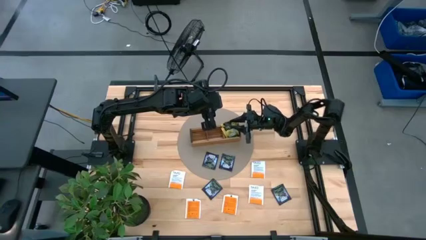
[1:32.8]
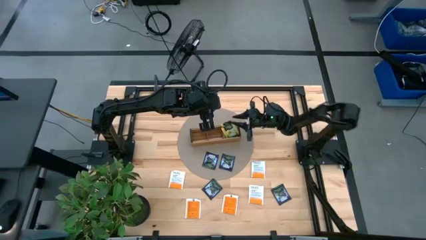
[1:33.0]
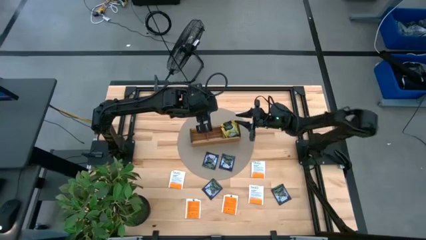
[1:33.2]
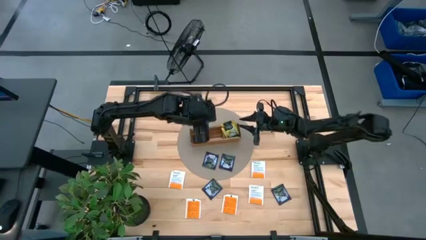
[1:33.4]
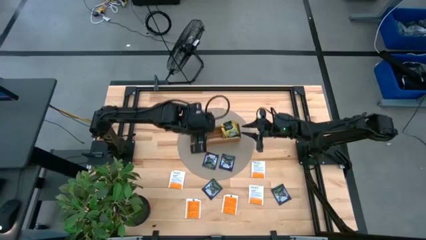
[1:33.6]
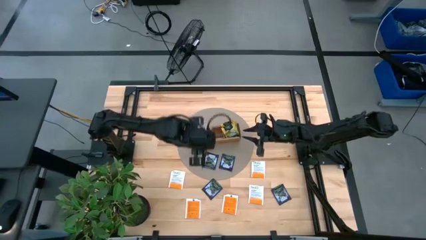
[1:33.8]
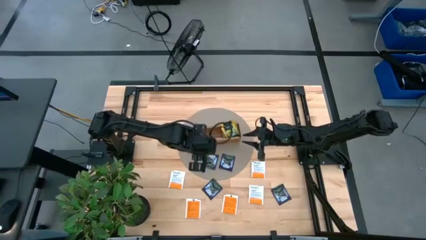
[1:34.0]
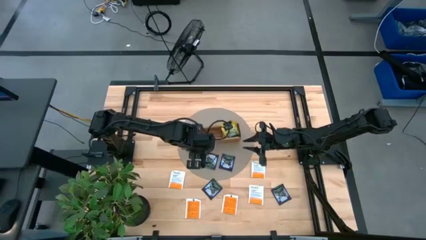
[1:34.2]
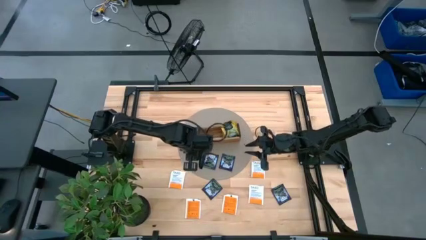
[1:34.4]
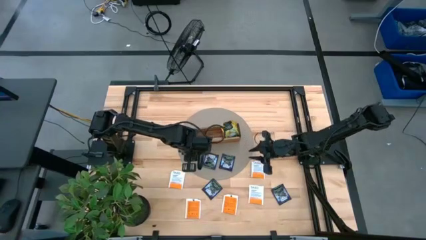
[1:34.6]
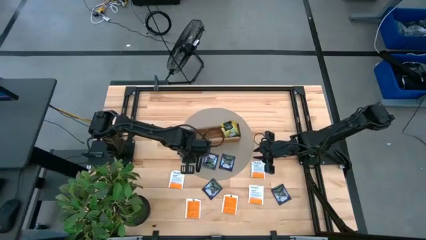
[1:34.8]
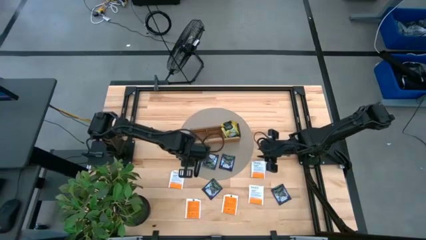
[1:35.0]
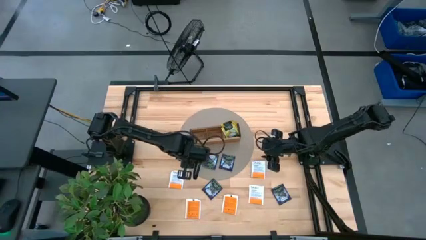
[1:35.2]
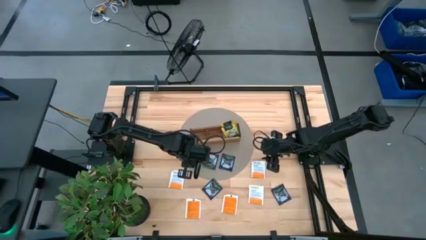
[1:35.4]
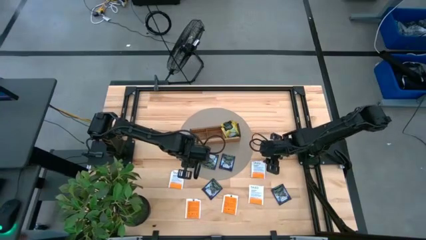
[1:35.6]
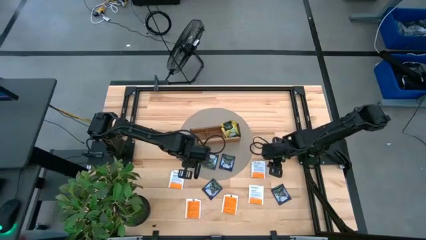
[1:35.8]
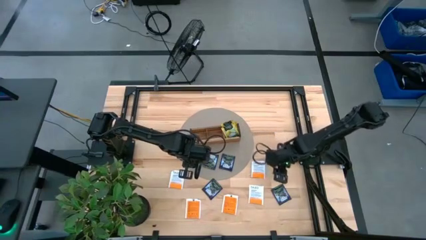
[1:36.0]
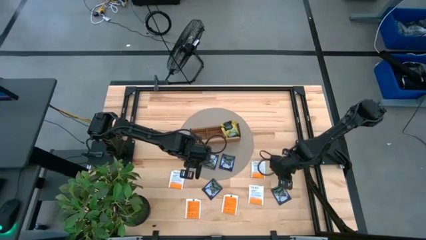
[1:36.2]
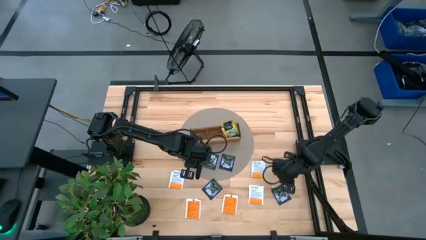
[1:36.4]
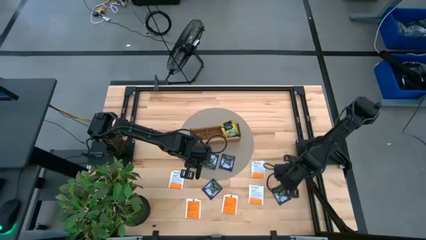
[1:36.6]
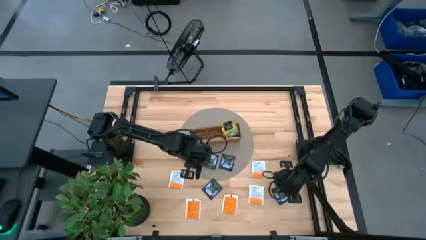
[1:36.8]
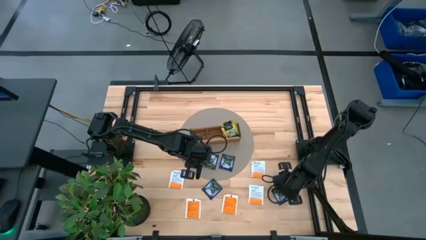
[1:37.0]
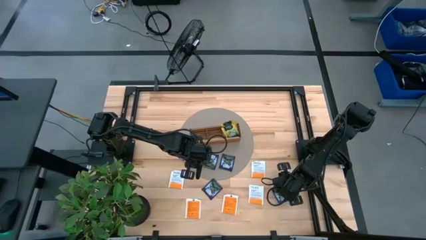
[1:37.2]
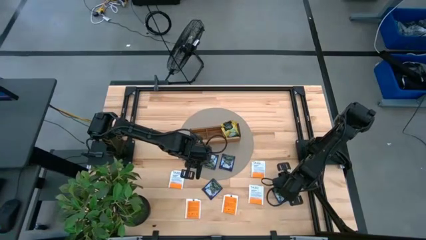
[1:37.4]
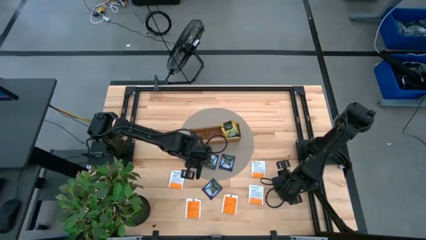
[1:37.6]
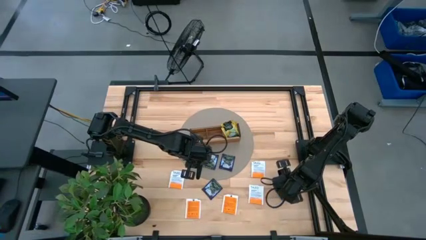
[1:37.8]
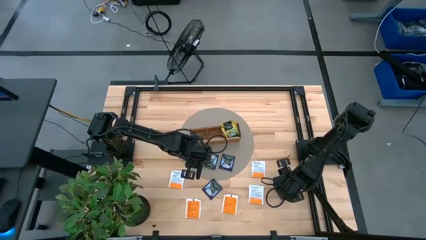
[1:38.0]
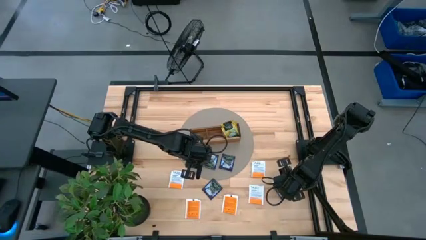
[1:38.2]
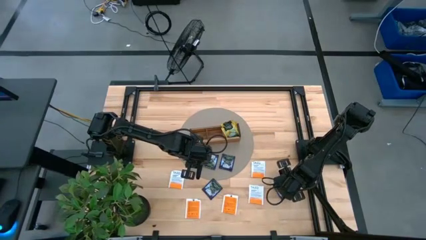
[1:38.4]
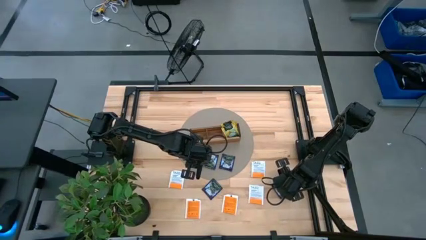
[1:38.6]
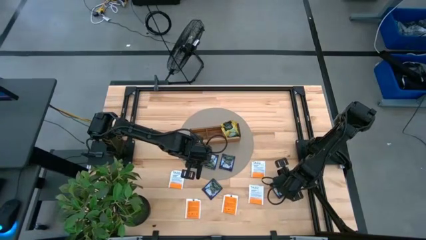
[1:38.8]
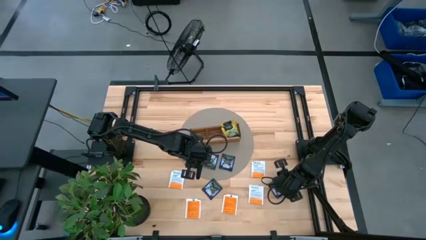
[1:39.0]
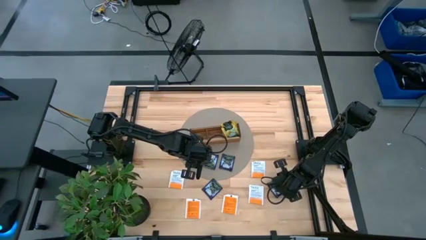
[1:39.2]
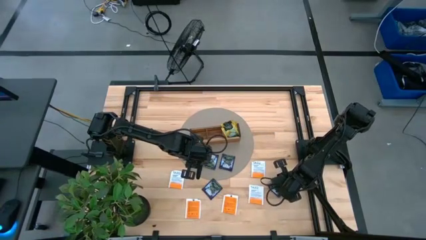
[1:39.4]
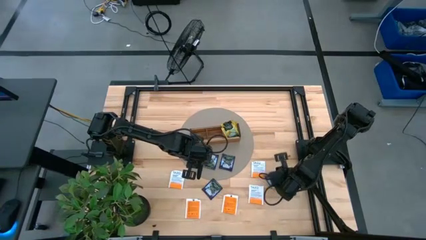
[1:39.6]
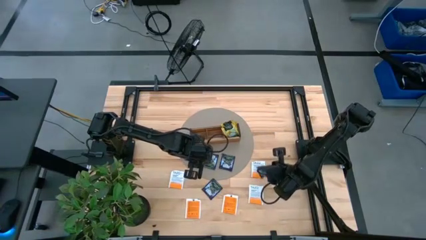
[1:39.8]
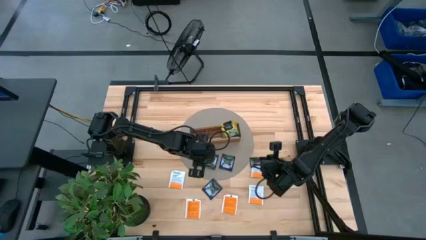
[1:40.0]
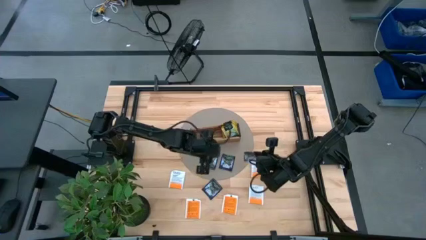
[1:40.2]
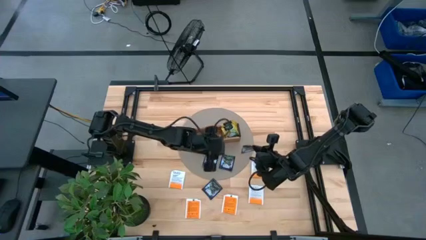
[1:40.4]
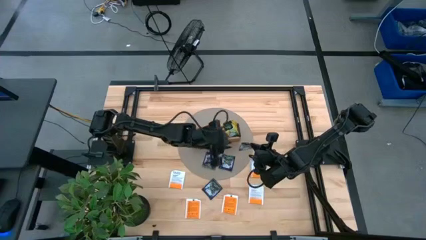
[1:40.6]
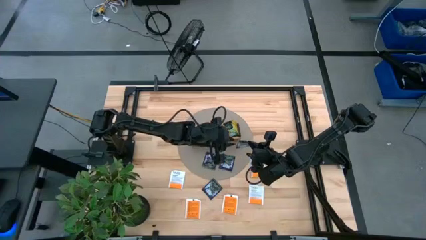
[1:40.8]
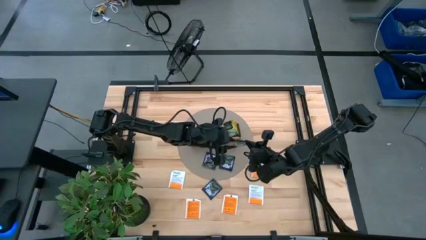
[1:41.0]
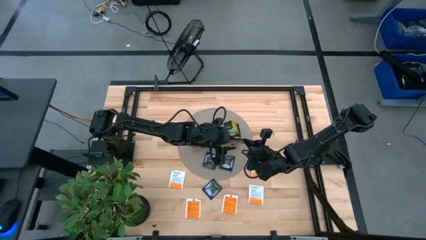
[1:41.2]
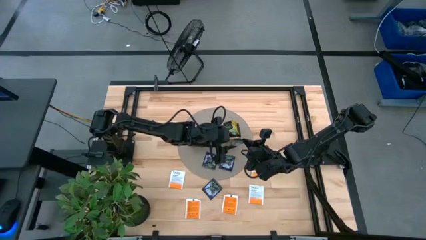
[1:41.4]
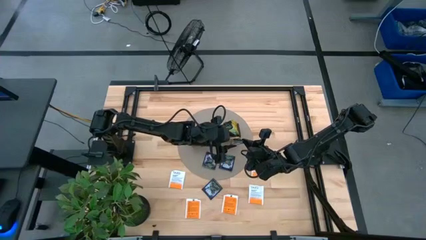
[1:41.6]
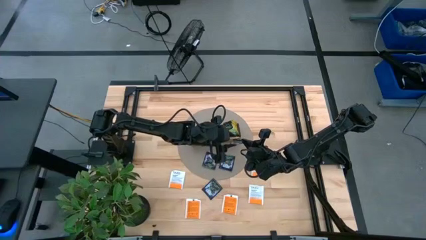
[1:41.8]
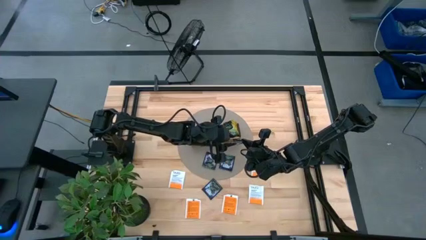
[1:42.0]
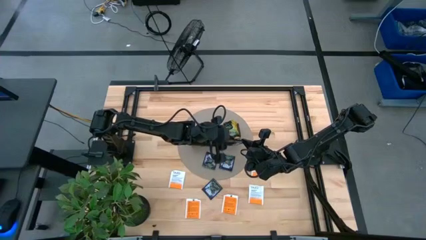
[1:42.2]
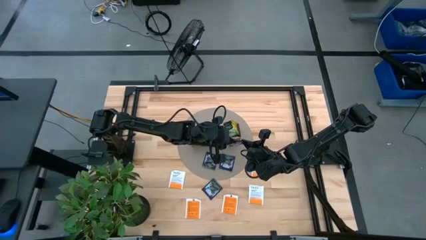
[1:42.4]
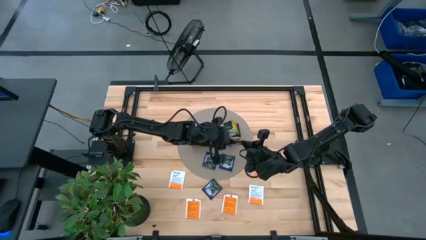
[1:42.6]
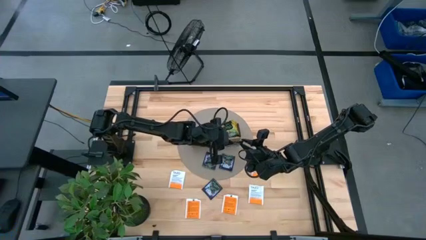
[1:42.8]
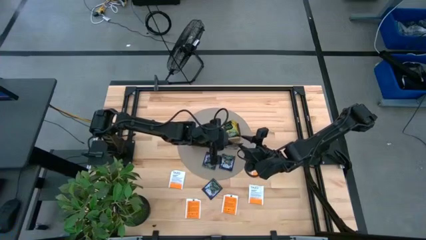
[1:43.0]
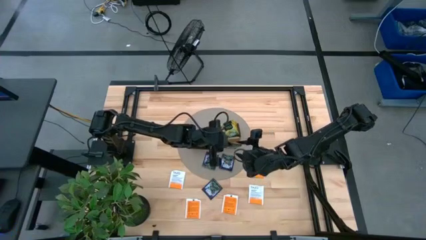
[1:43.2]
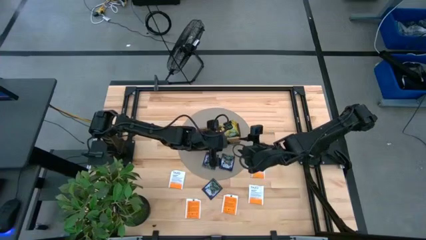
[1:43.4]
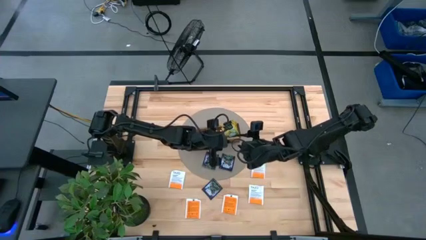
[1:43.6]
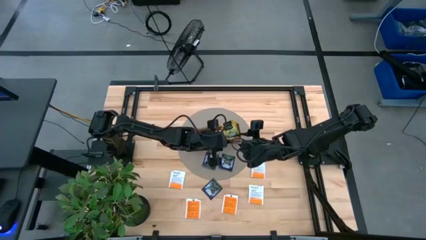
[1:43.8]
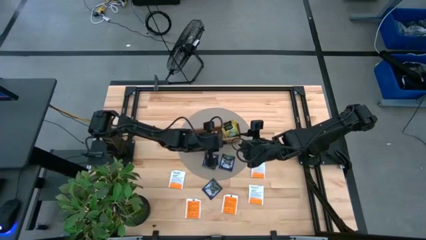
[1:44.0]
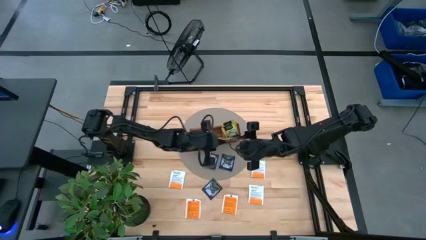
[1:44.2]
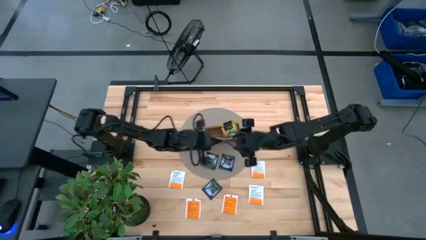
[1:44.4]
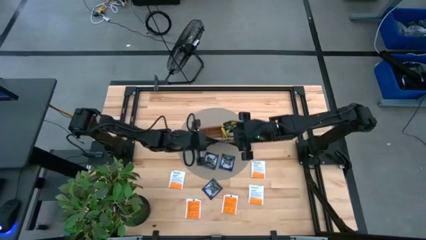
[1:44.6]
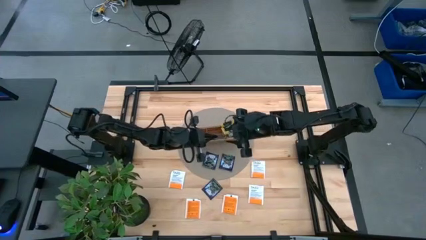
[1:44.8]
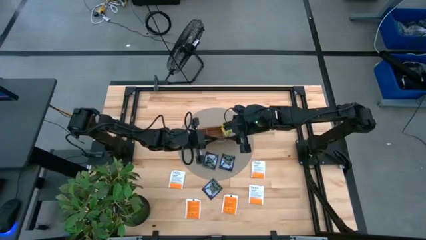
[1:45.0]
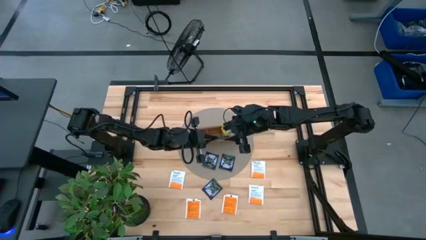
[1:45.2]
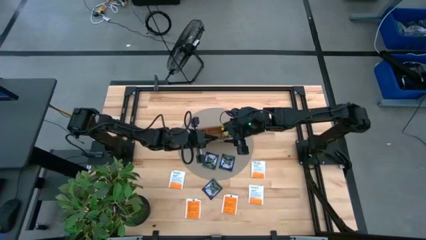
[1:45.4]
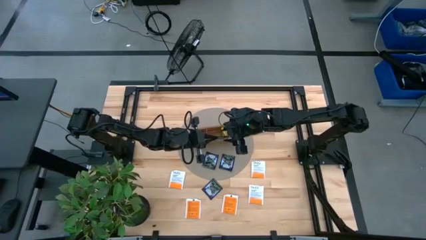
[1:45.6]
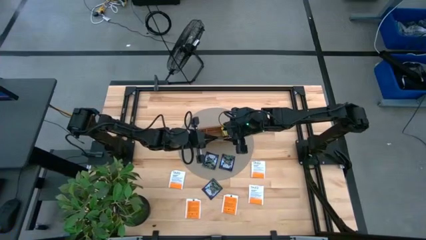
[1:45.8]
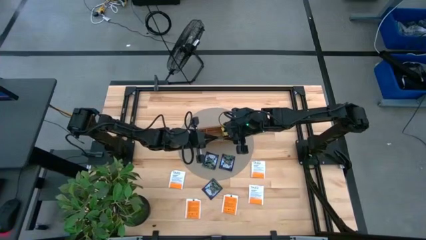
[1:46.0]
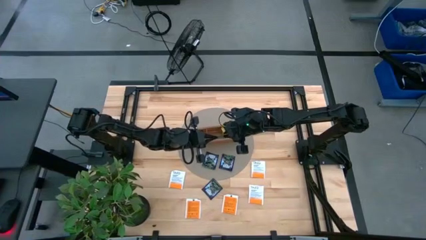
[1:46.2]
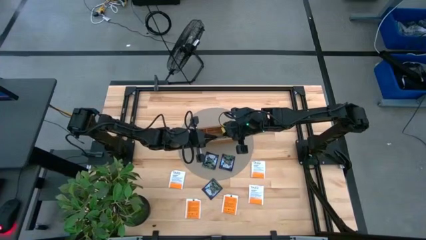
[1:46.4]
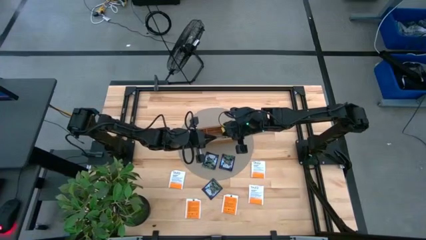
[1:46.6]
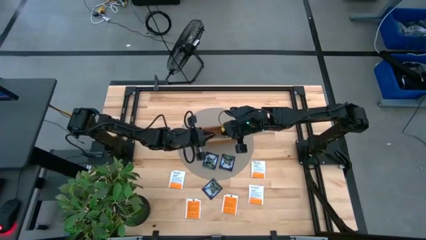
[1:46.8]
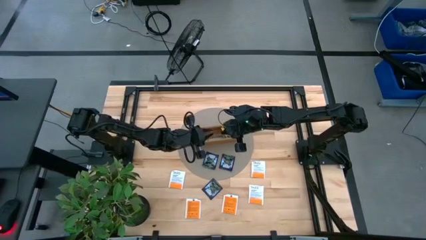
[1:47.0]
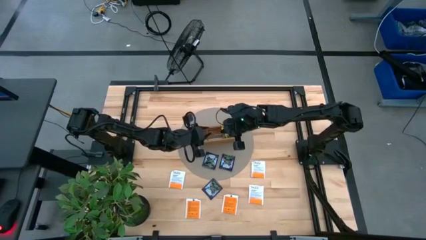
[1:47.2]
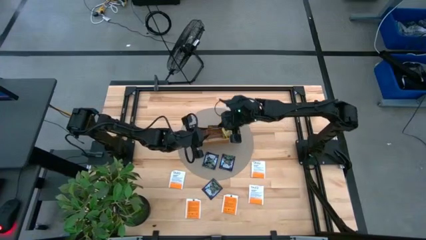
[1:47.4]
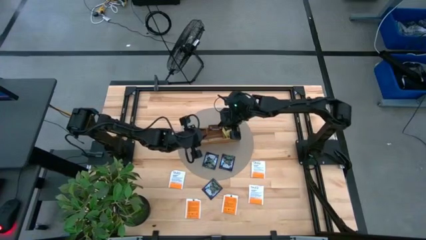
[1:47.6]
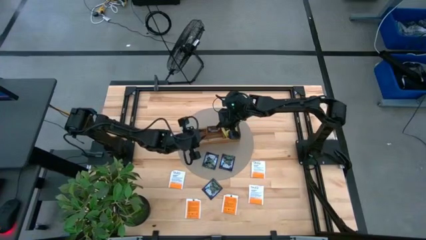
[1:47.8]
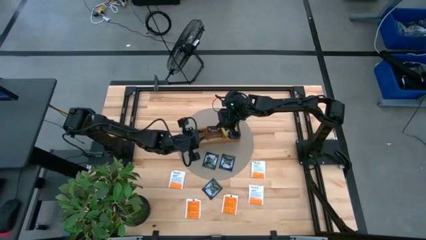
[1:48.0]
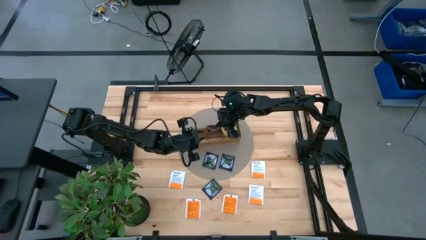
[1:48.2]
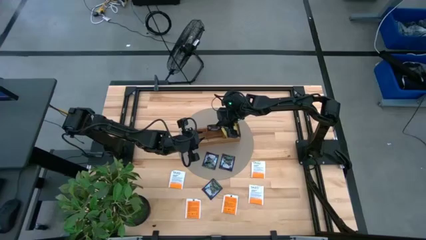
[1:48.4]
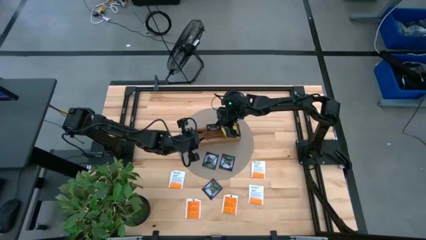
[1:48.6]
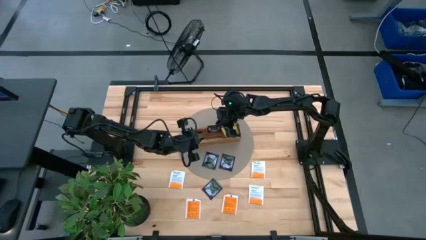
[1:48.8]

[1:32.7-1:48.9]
Task: Pick & Place Tea
Put the violet tea bag into the middle section of the wooden organizer
